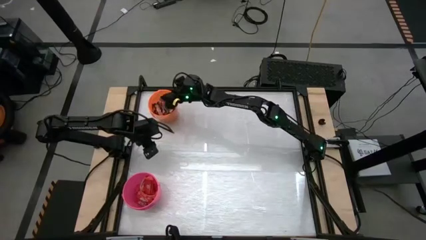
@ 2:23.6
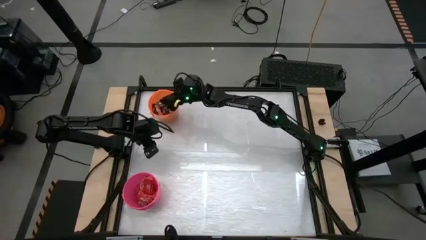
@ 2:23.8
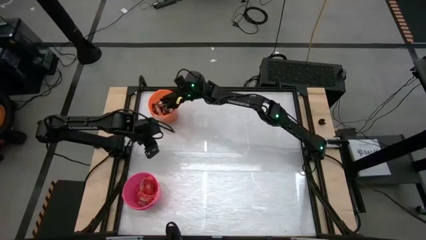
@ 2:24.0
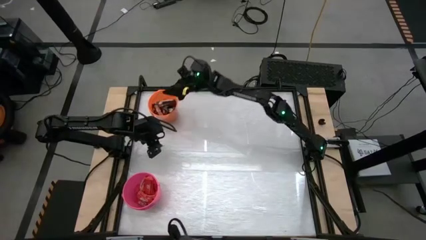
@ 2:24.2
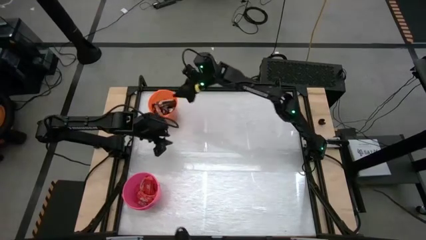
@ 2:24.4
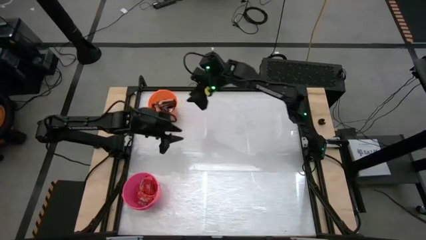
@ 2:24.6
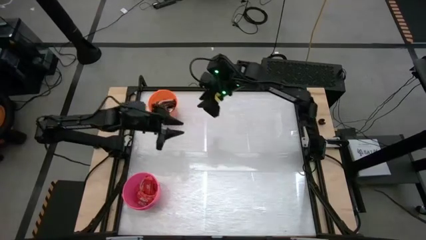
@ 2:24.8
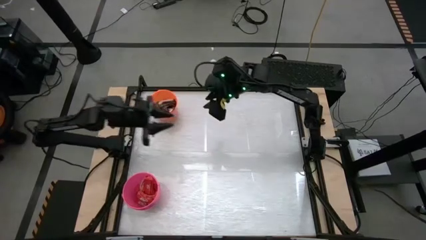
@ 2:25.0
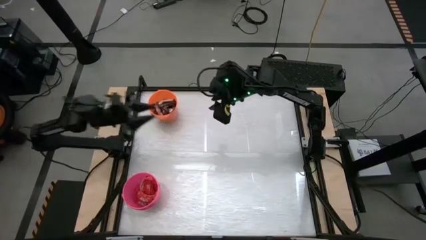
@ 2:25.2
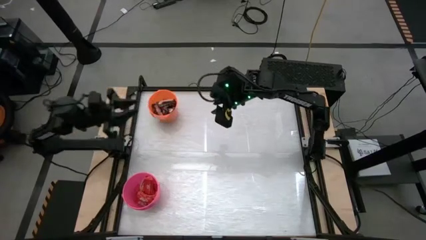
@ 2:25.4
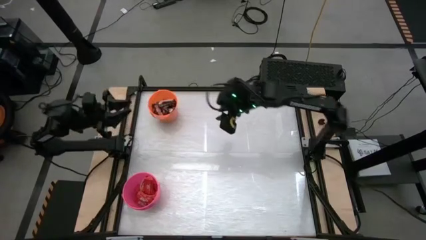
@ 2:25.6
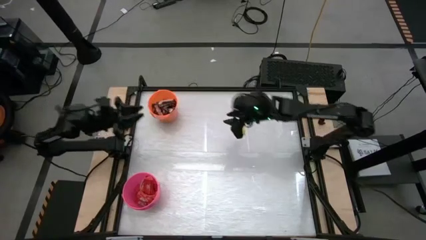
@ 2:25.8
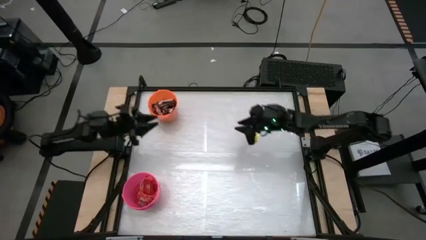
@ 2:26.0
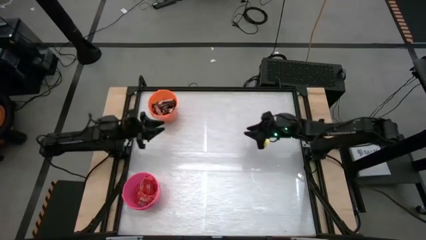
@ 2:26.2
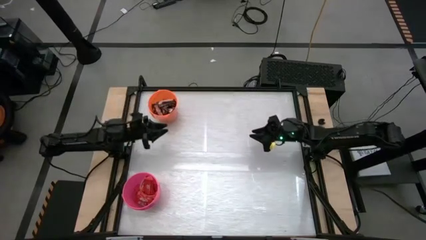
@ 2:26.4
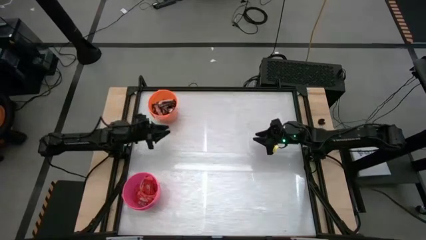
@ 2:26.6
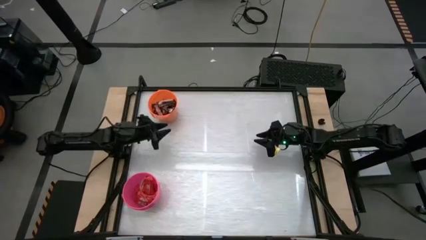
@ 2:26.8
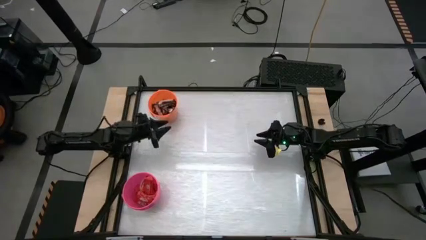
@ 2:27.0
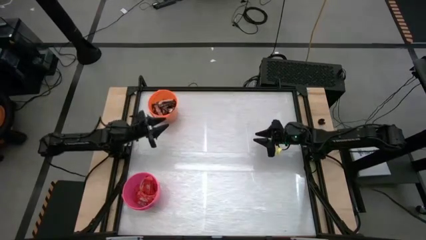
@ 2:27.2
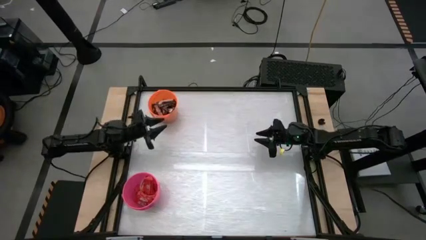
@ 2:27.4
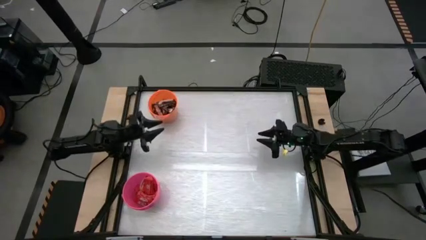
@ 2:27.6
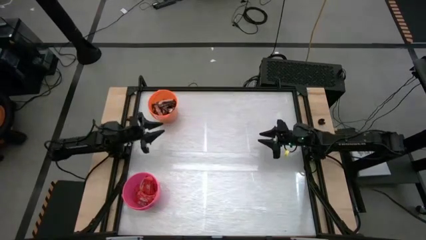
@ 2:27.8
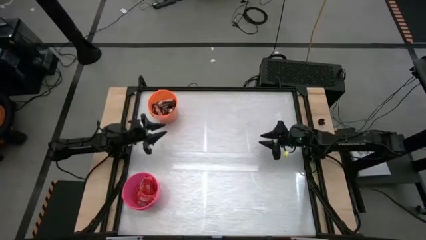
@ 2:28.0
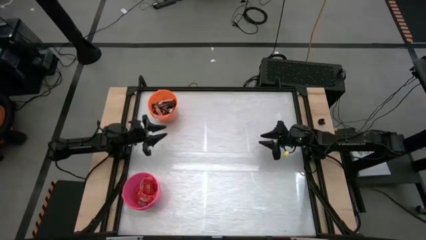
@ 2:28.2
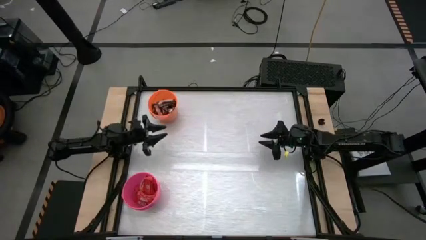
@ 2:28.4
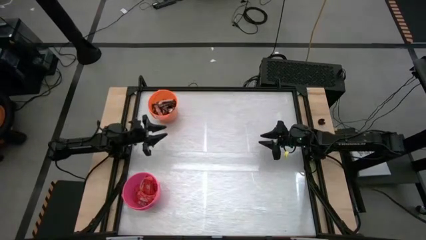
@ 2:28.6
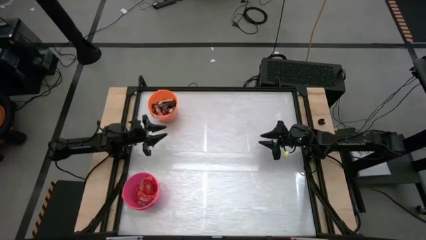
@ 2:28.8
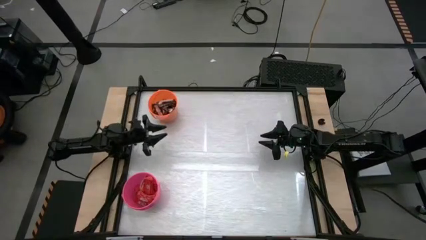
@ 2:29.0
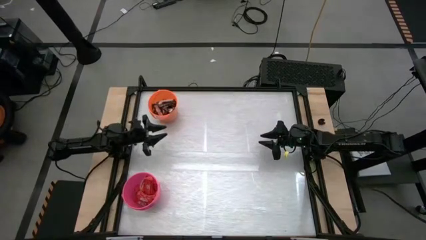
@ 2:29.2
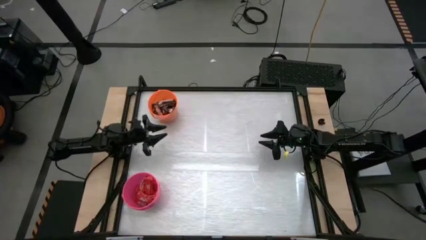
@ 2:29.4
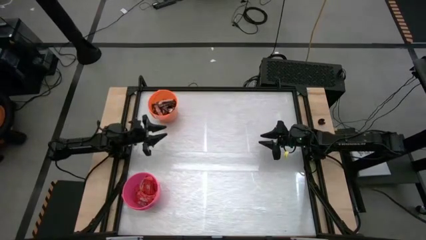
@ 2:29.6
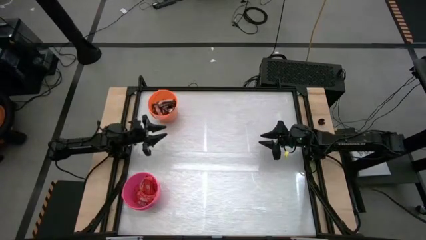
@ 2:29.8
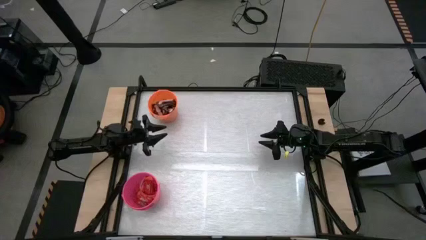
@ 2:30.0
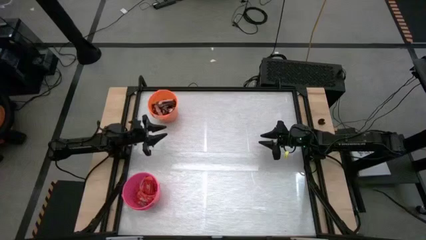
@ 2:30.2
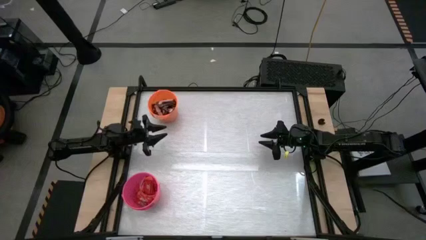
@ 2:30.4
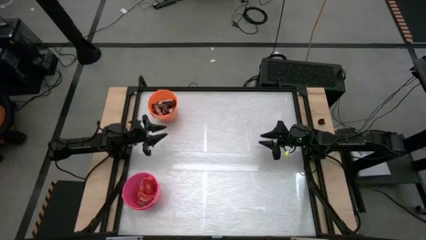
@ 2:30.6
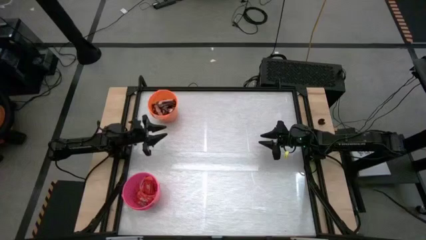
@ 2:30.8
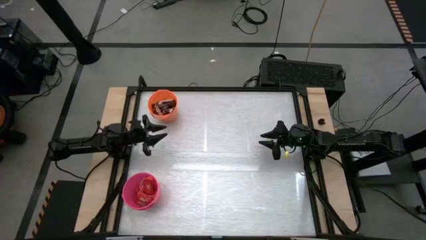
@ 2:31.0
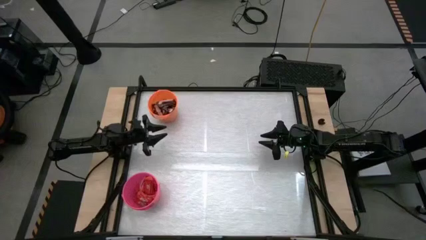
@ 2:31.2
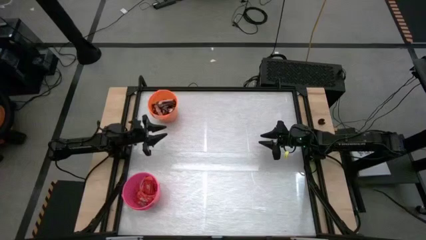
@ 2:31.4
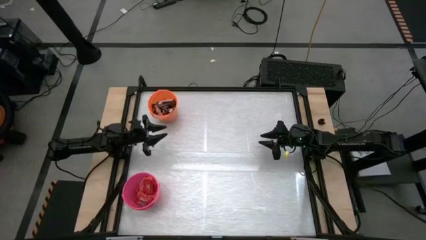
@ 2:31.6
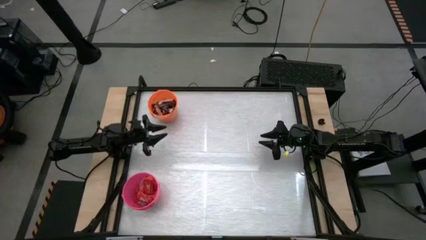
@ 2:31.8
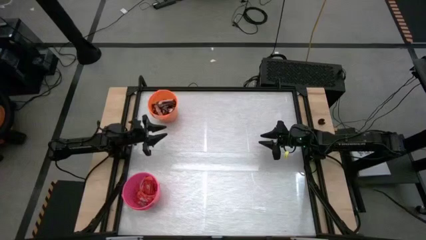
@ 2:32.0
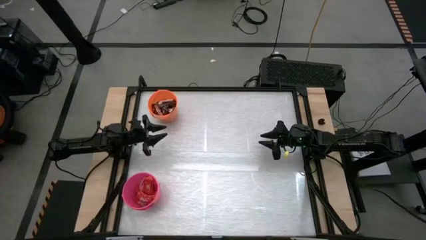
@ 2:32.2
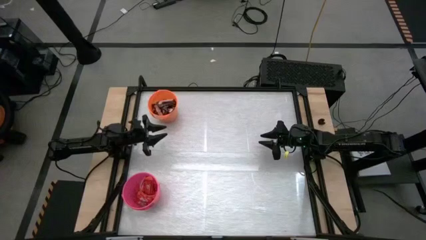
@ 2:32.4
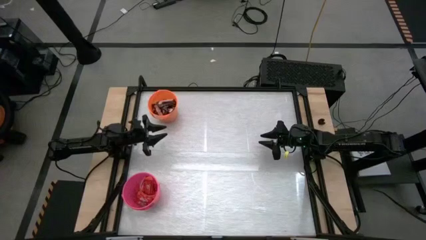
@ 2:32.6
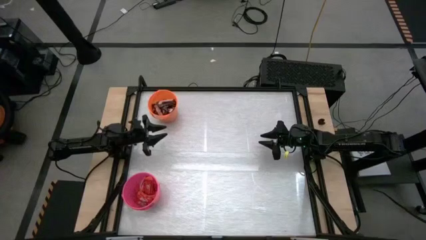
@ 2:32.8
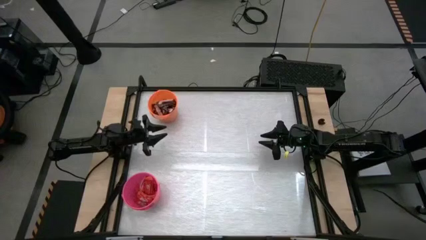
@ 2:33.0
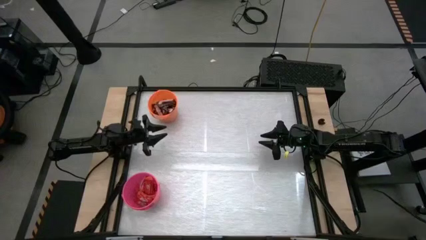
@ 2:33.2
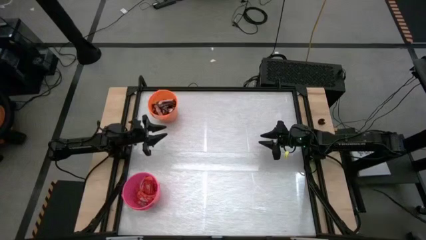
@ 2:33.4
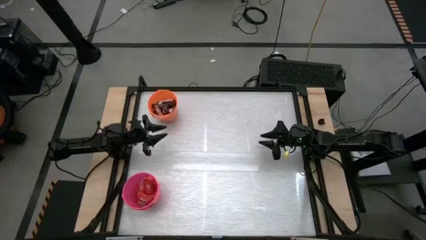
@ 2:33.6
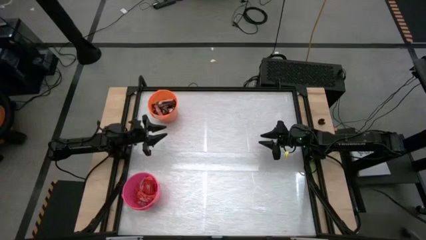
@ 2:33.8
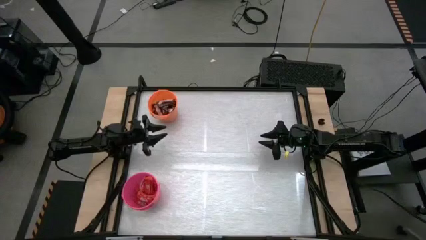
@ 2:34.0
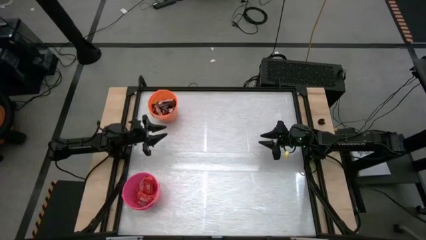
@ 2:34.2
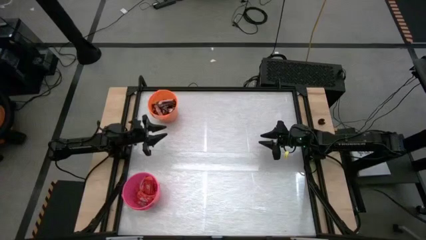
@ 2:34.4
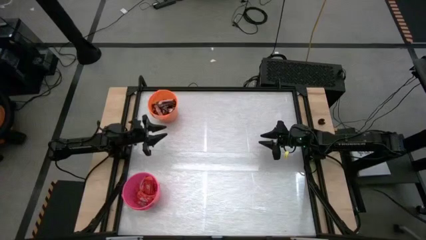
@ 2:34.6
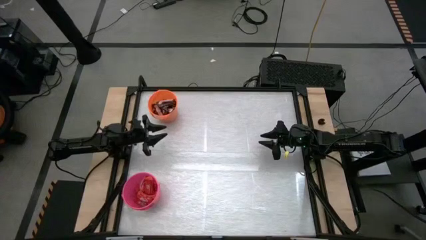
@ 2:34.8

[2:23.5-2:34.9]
Task: Sort candy by brand, put in halloween buckets
Return to Home Position
